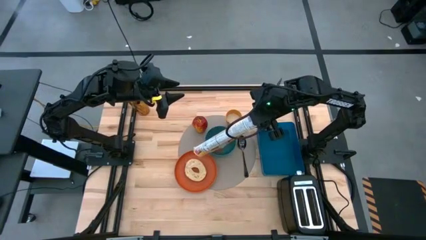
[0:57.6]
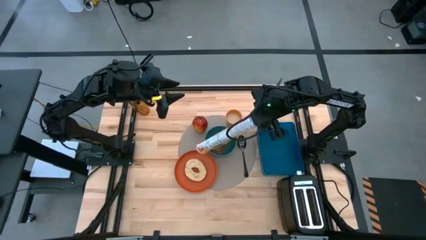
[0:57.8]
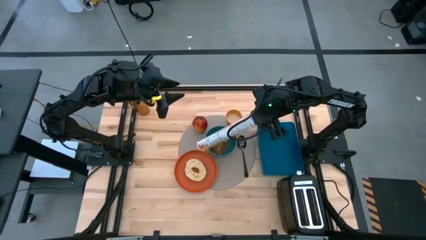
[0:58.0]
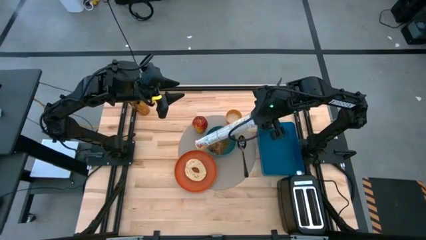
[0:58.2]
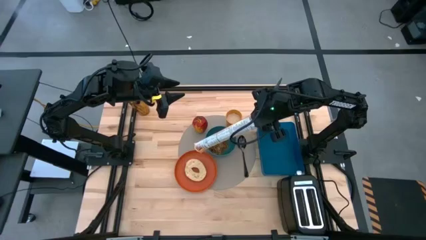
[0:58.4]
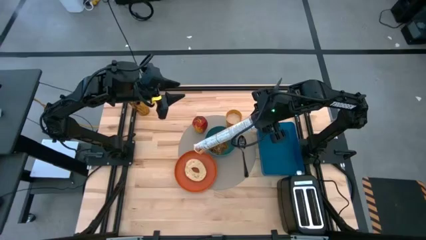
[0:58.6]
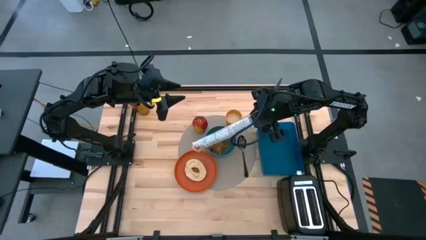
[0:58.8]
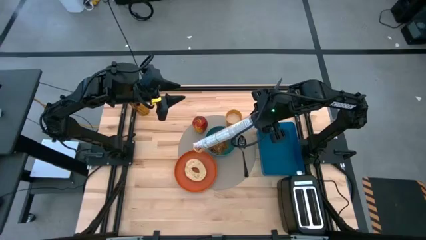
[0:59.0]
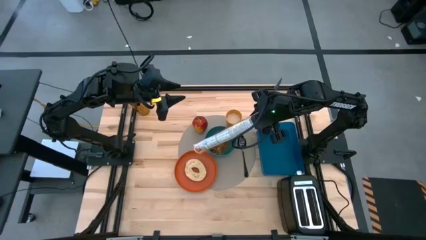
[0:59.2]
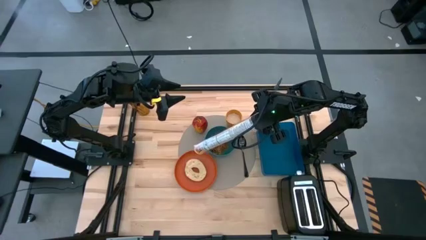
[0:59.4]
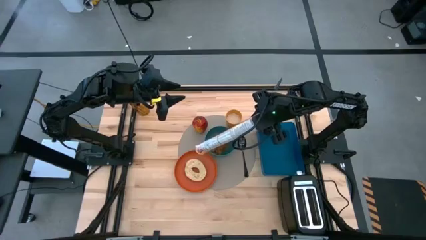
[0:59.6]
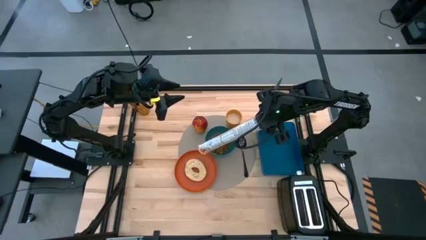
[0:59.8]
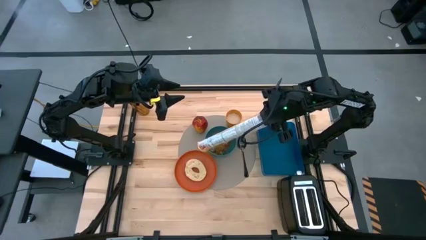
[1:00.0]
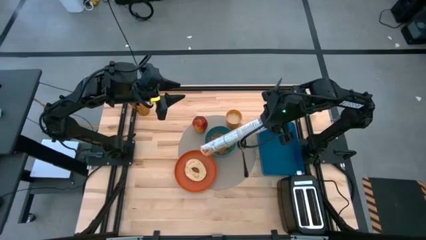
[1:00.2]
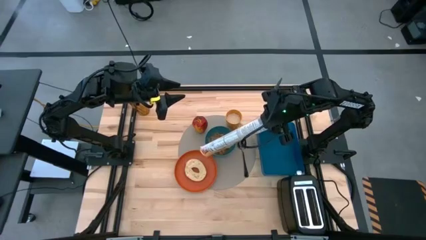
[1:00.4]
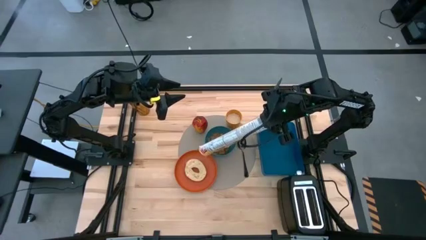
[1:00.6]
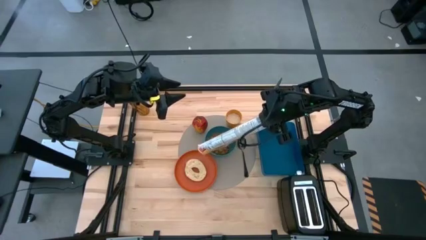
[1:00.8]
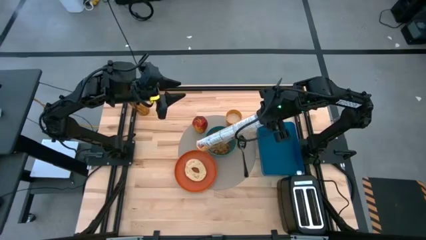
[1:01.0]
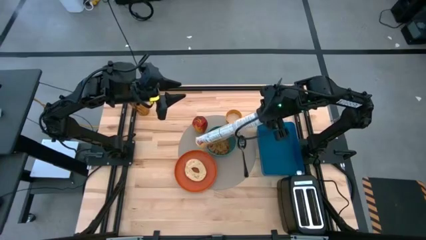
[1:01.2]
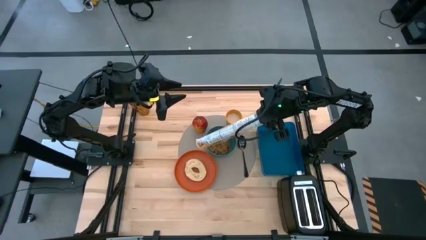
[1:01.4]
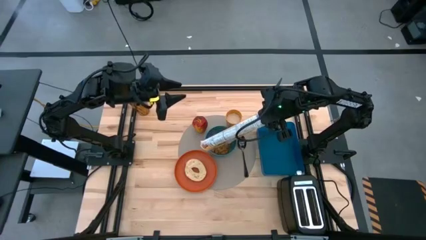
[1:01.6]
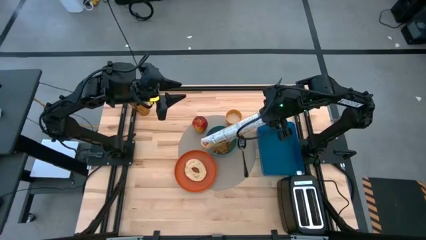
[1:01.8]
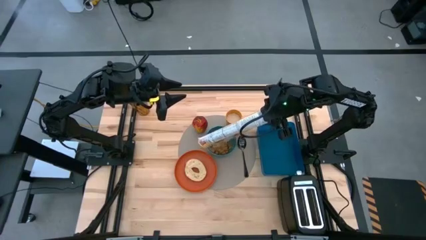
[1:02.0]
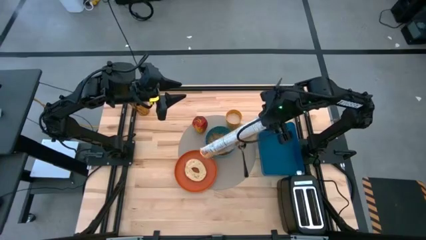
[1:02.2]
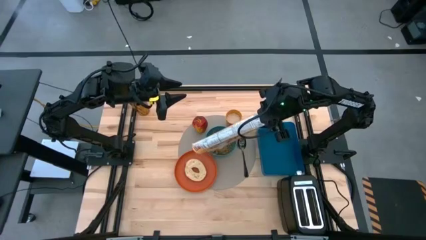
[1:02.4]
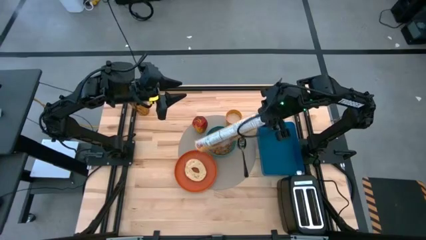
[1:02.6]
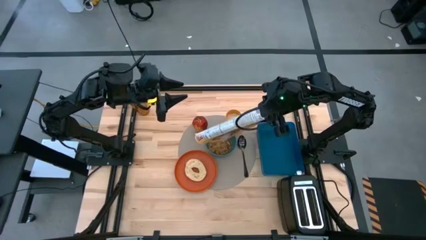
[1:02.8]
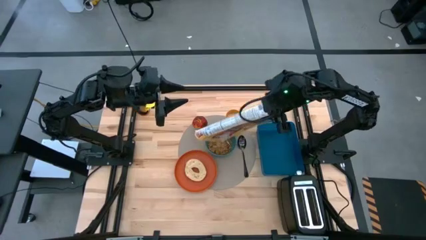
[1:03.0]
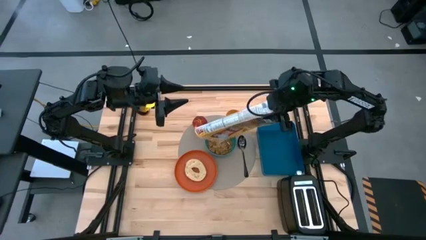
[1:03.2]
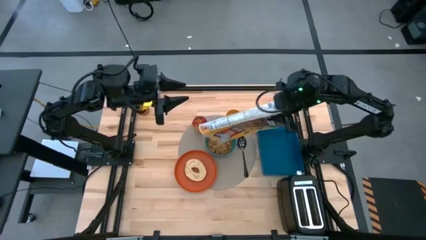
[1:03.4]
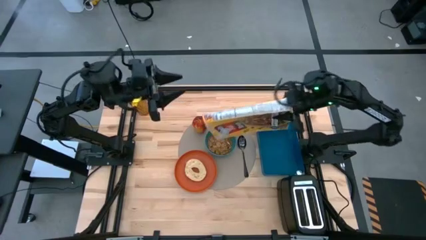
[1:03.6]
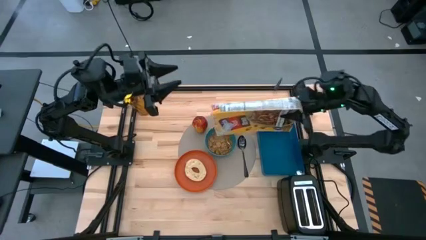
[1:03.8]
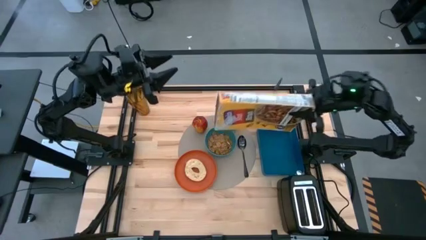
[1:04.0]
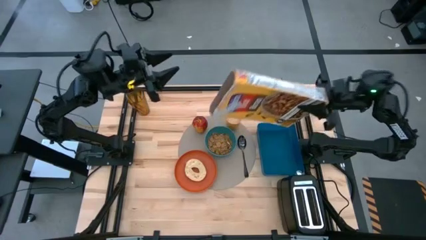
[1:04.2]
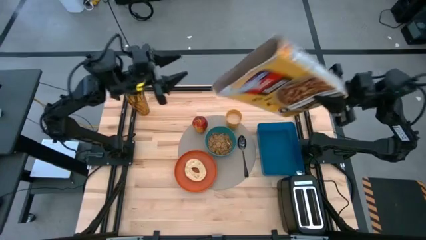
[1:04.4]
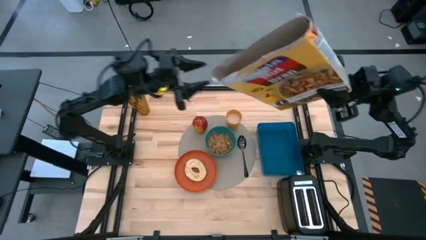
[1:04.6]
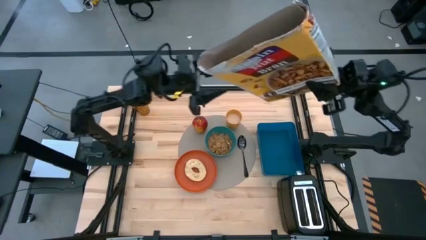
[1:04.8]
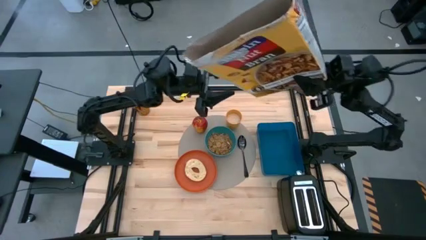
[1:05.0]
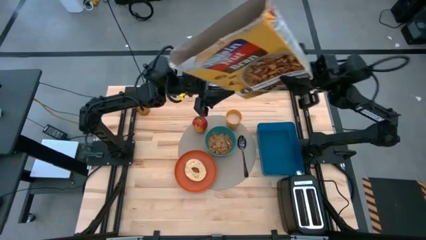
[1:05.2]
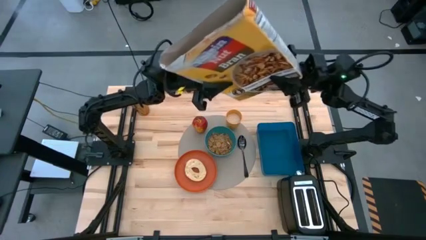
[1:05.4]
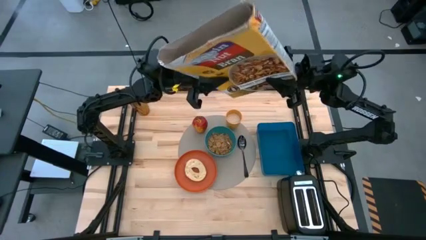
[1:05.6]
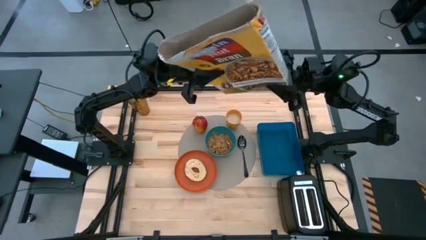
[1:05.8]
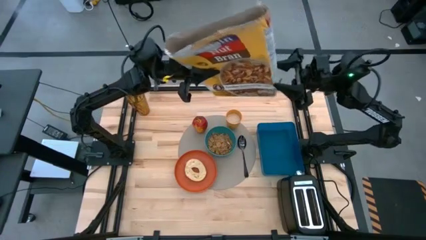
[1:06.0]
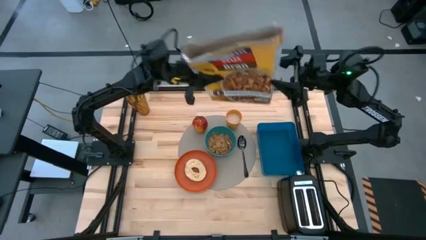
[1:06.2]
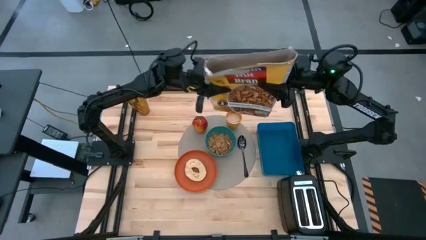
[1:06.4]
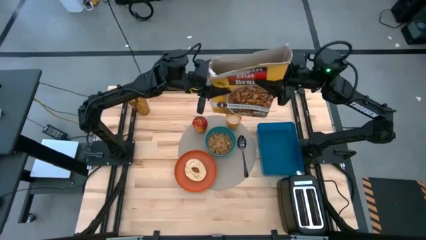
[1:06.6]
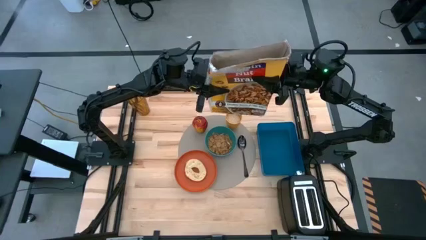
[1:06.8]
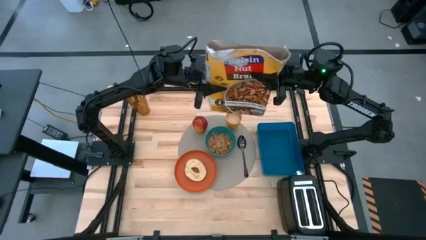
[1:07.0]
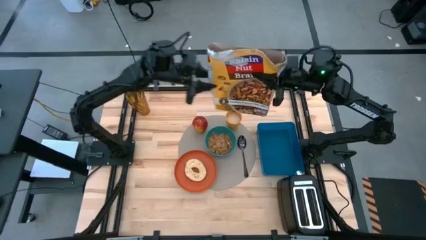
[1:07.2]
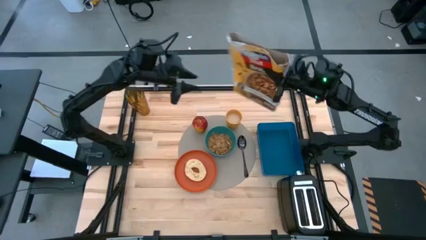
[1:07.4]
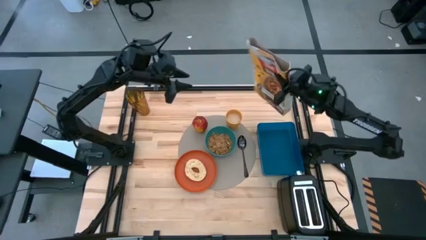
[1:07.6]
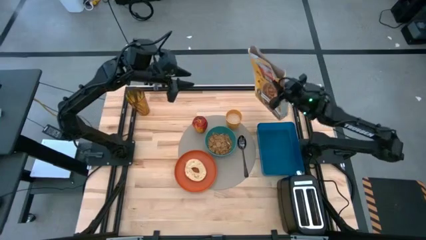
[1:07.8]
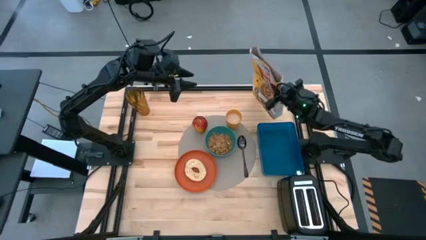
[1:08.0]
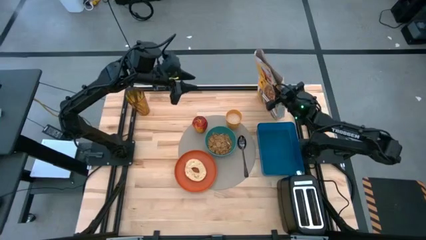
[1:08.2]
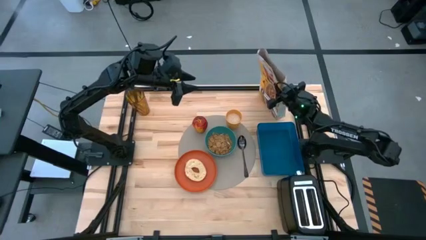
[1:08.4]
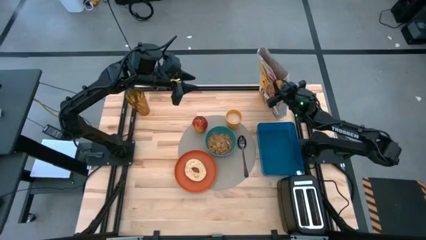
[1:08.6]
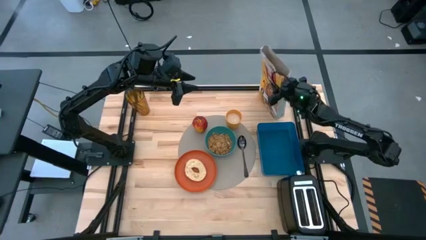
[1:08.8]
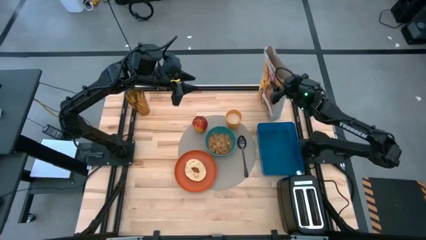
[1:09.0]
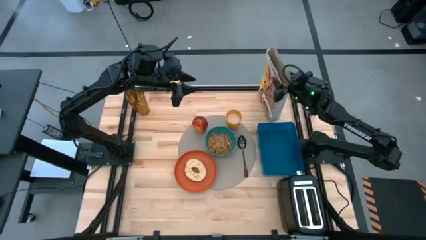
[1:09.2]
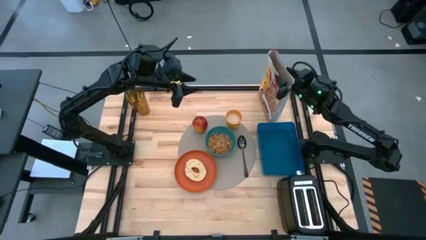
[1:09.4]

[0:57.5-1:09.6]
Task: Arrange a breakfast setting
Pour the cereal from the cereal box into the green bowl

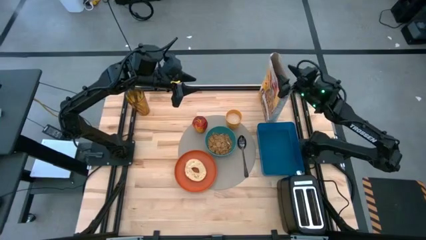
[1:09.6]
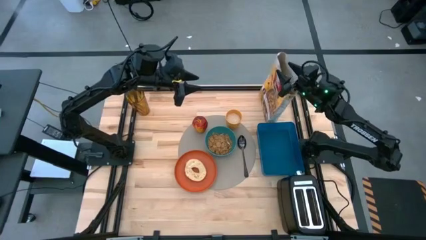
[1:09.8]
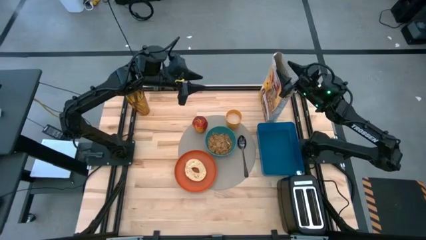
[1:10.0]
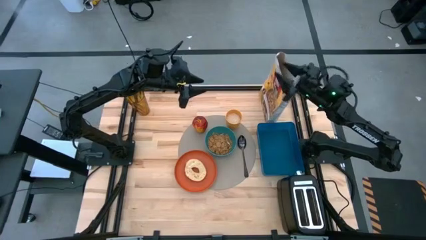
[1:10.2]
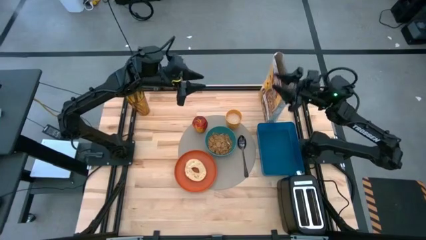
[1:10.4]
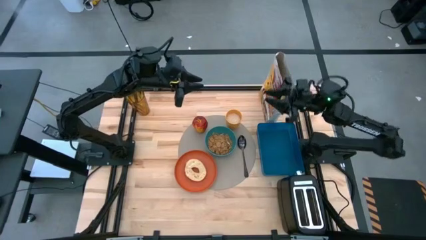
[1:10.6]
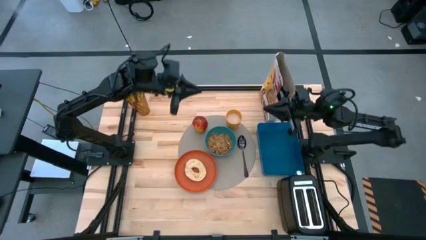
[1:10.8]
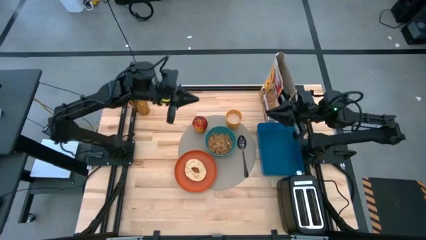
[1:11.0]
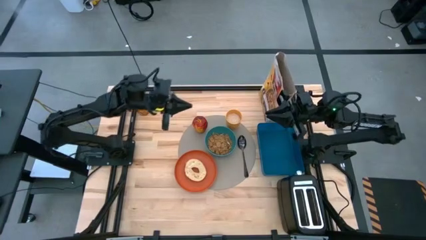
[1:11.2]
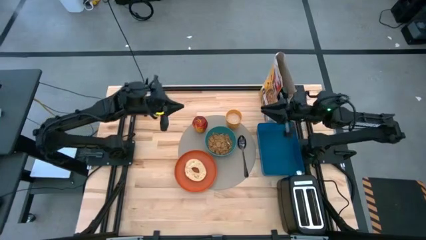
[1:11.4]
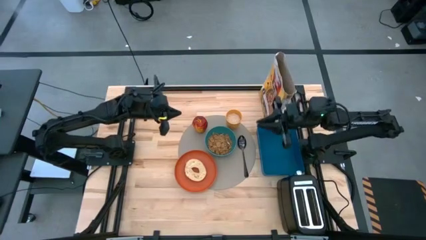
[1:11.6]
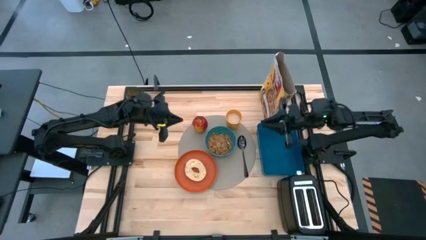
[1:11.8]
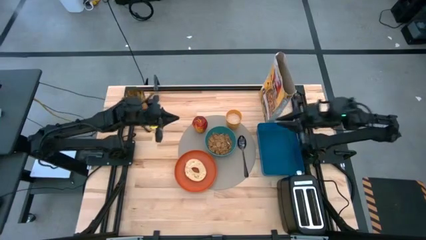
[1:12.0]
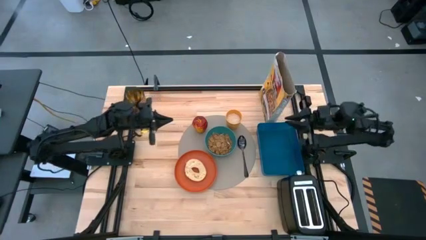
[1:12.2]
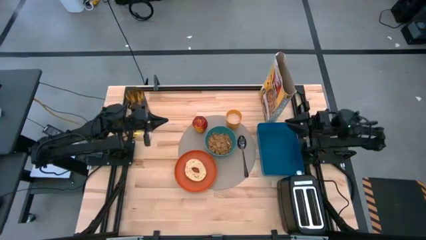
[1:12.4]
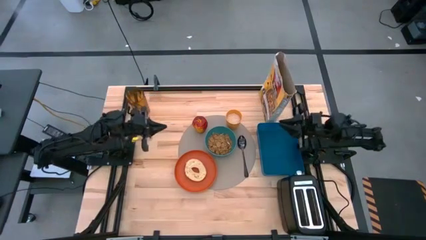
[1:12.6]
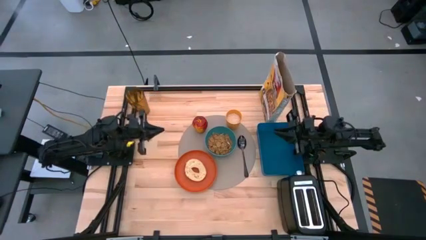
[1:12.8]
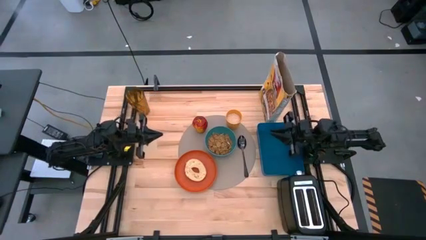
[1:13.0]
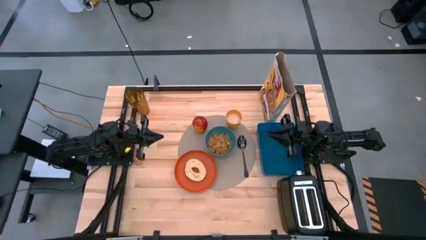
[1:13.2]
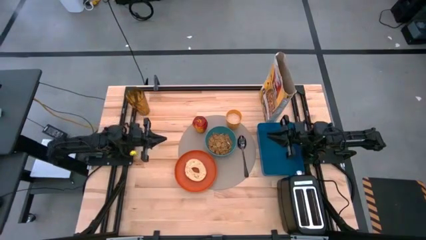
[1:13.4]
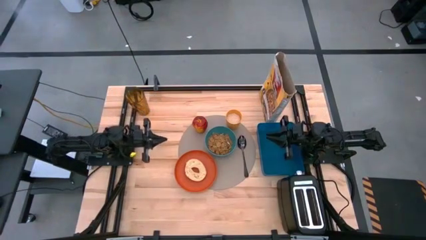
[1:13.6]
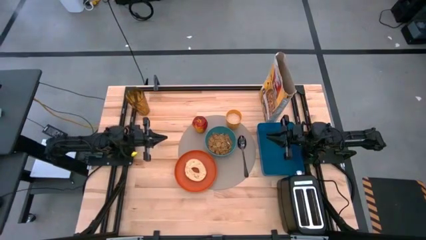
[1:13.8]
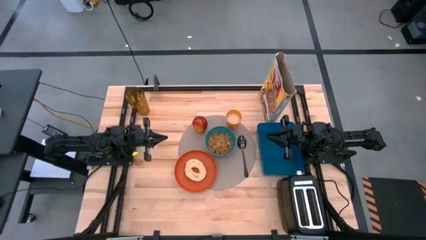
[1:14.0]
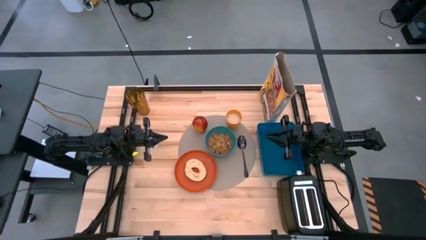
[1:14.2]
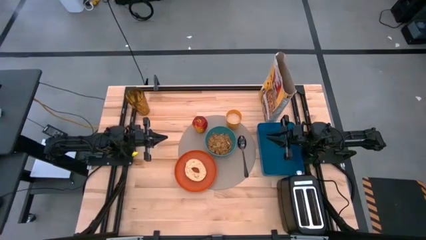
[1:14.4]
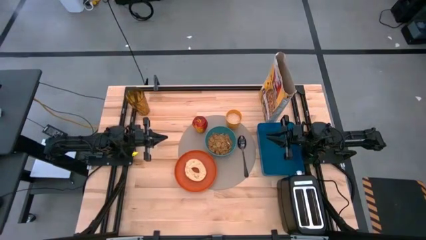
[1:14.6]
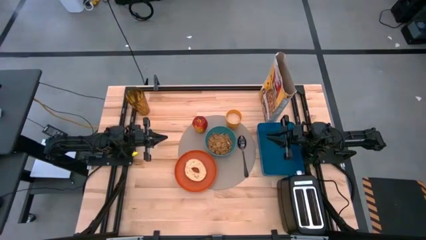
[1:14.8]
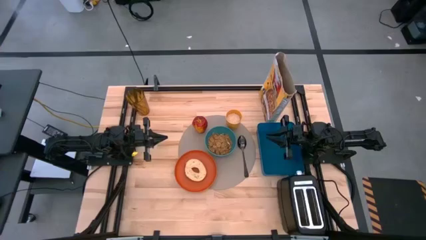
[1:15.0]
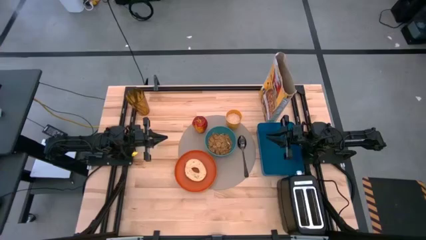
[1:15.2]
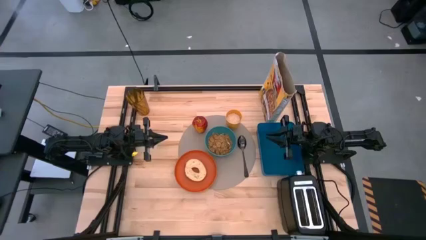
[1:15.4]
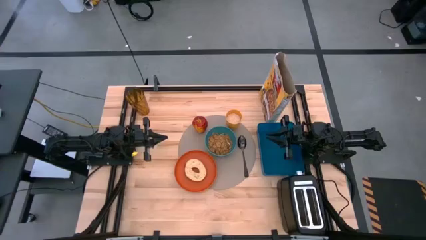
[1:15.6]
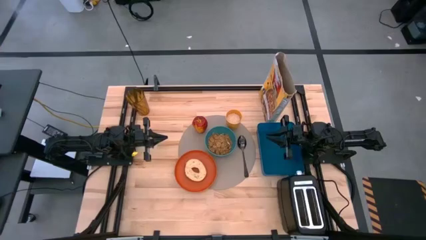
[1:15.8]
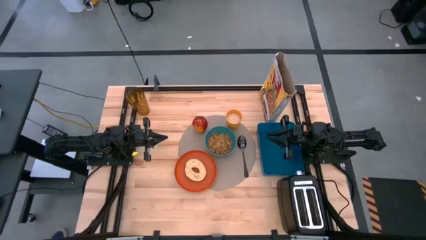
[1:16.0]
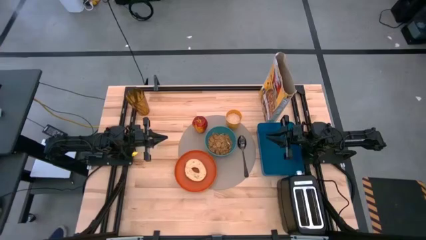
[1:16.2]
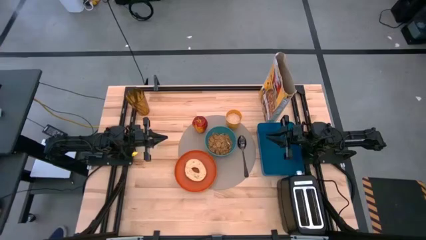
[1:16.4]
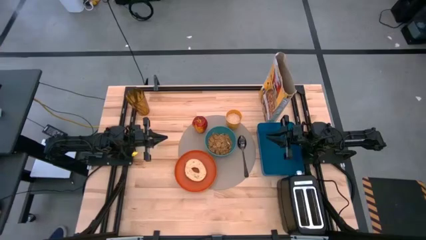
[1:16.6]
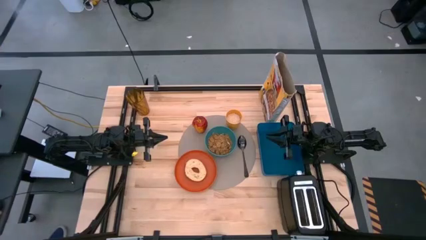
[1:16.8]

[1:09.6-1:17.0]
Return to Home Position
